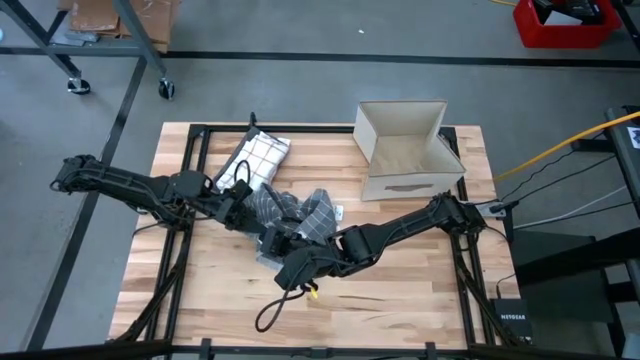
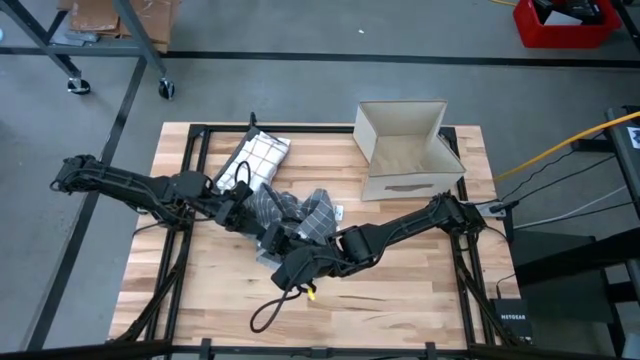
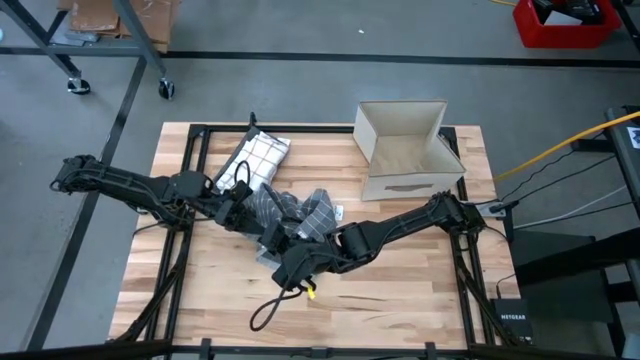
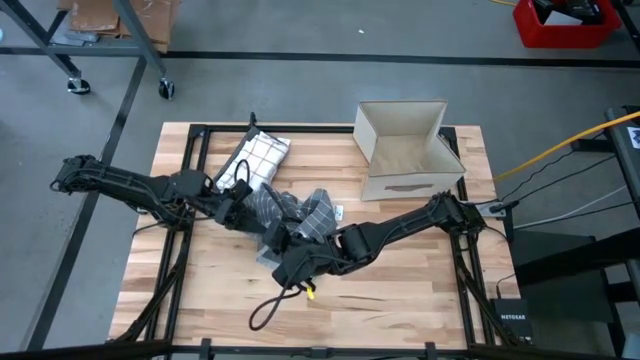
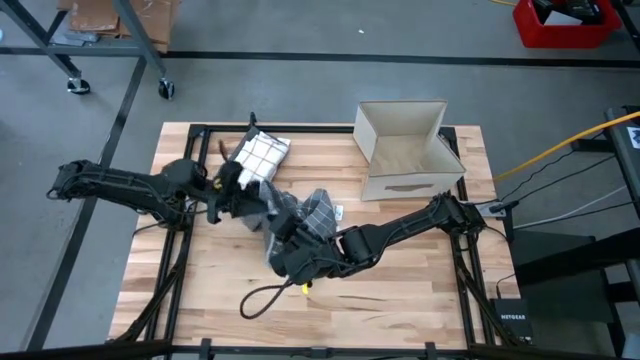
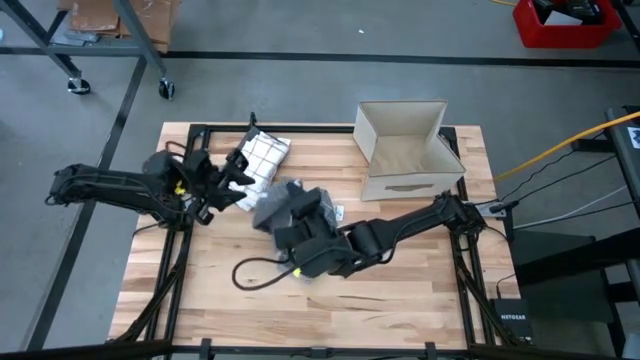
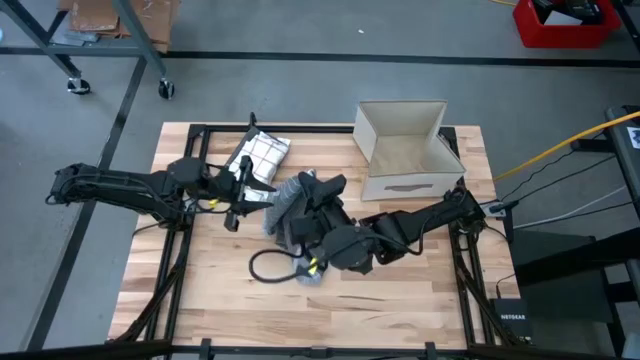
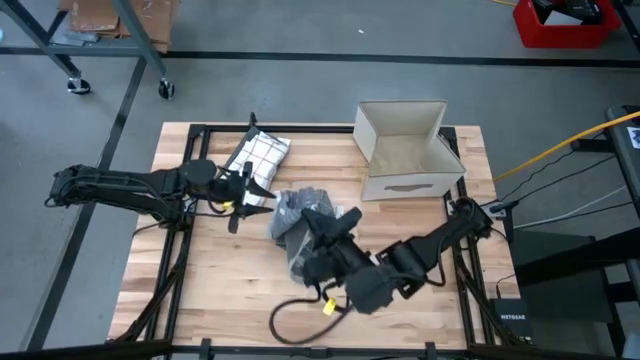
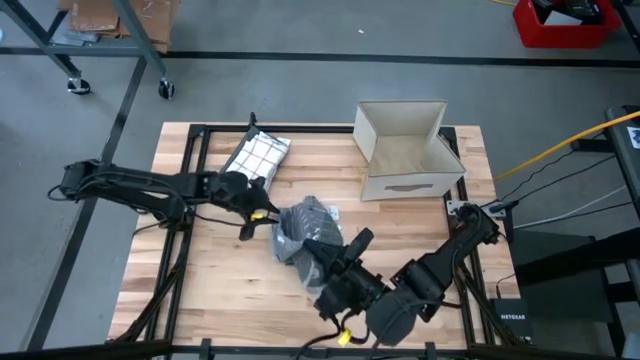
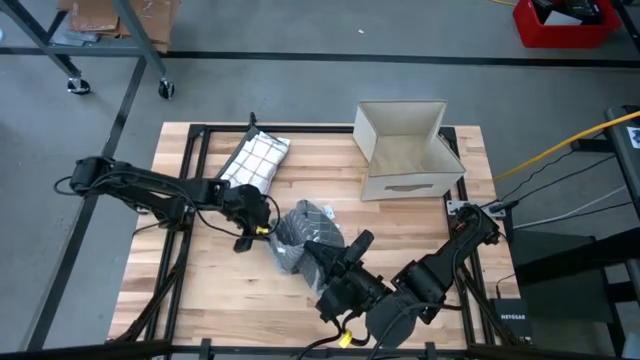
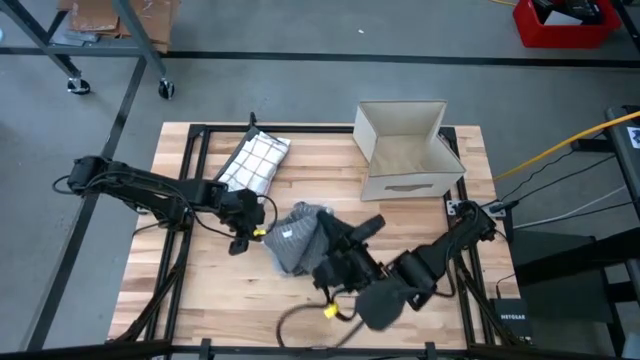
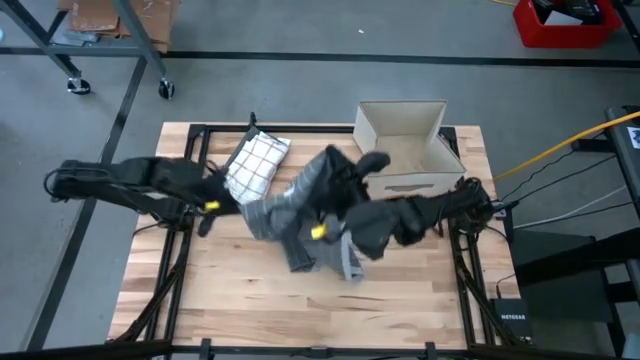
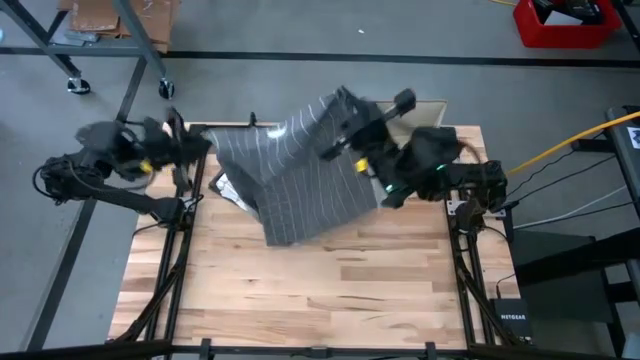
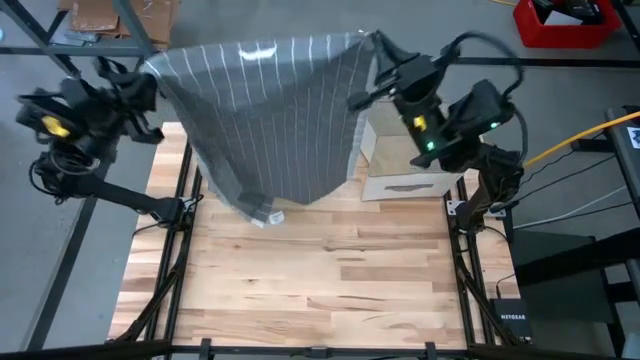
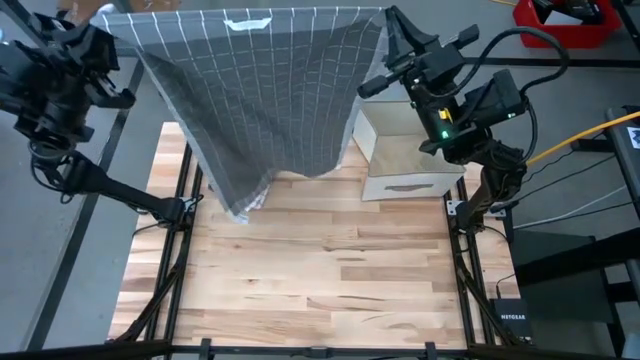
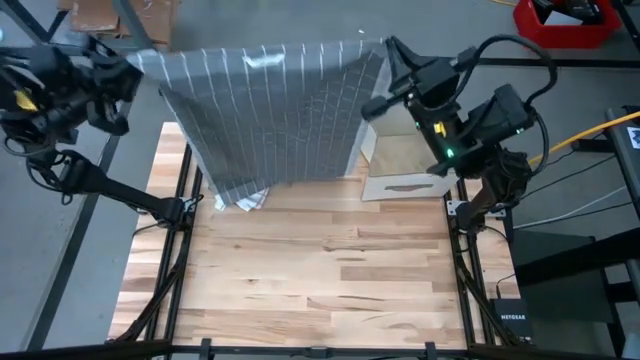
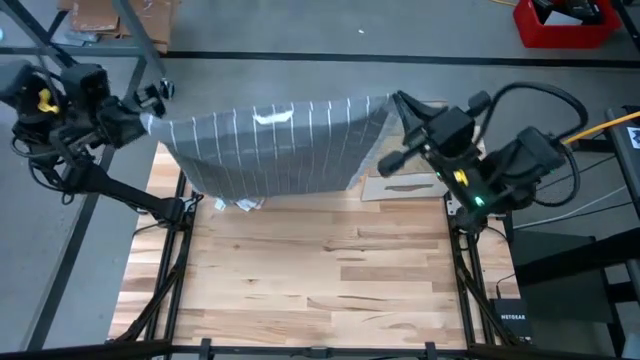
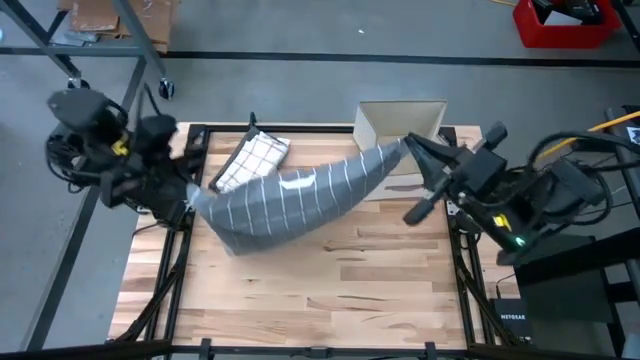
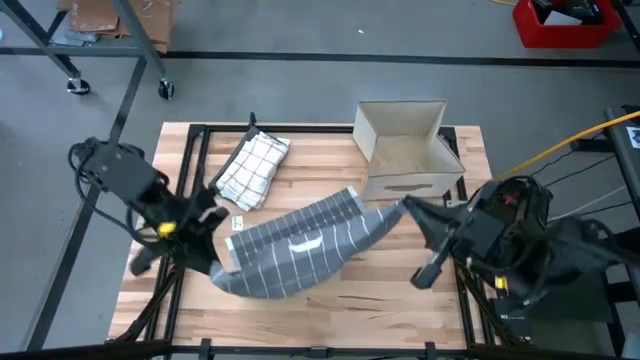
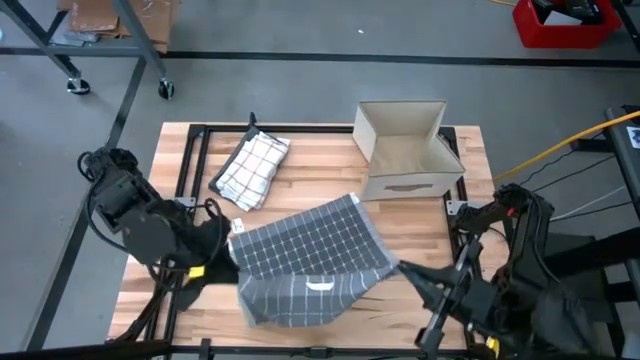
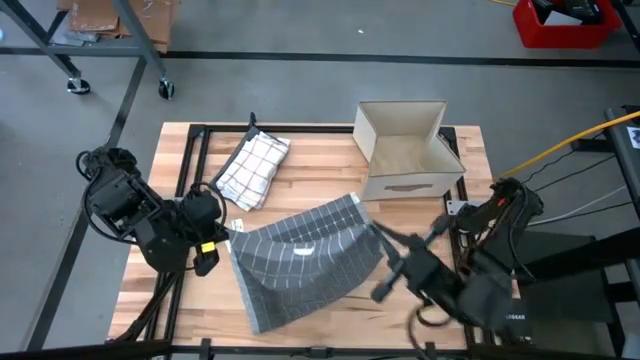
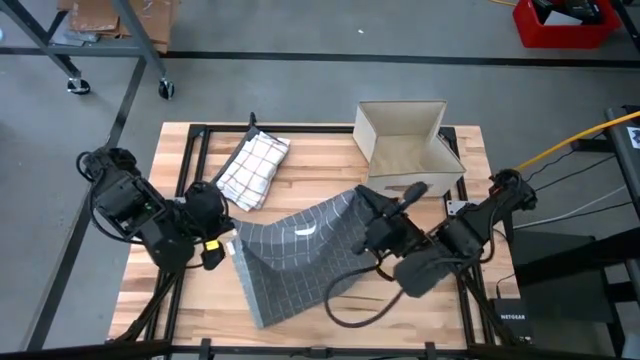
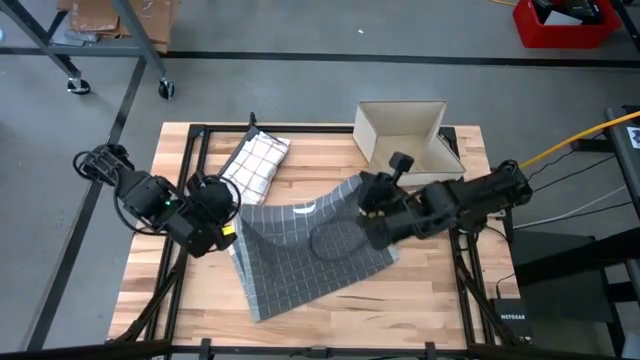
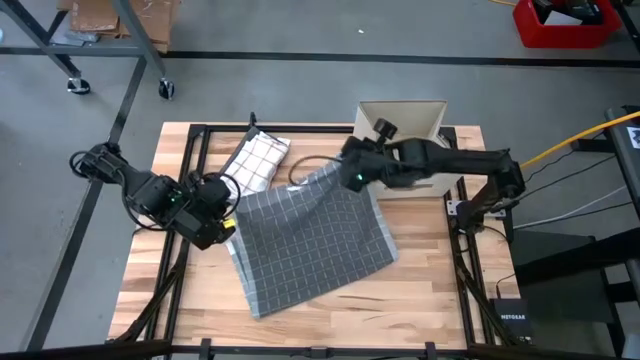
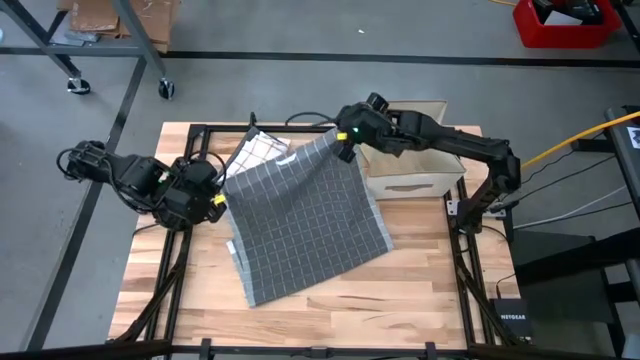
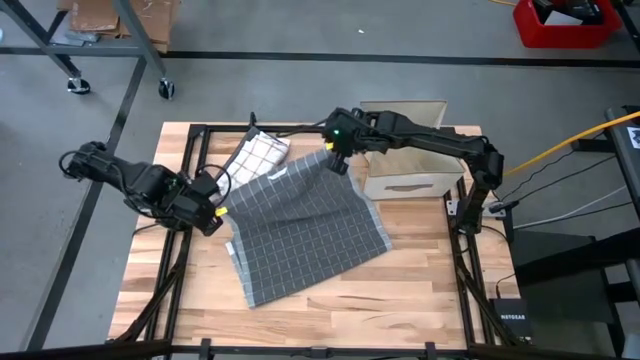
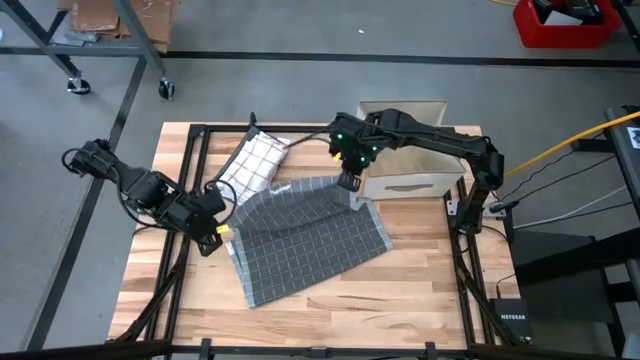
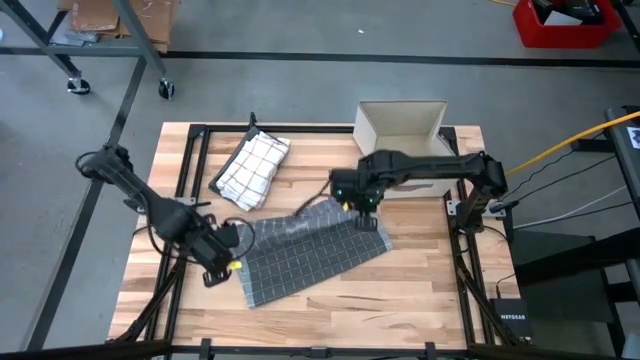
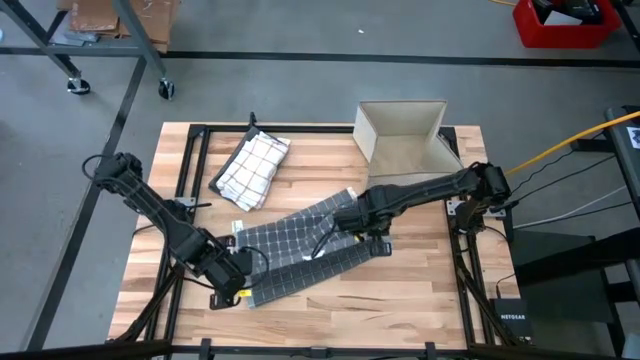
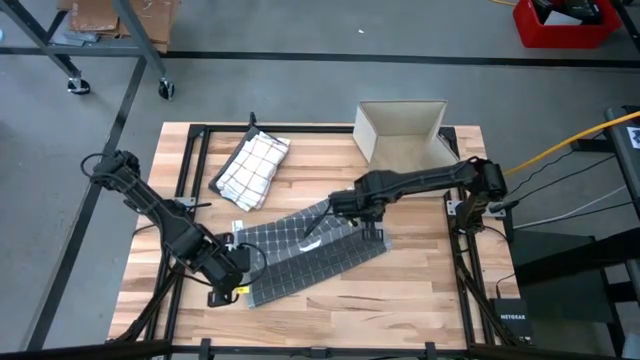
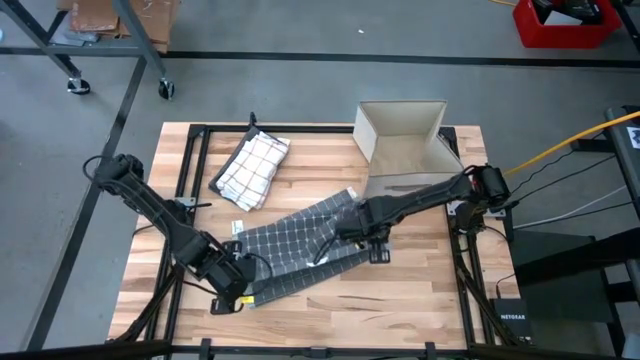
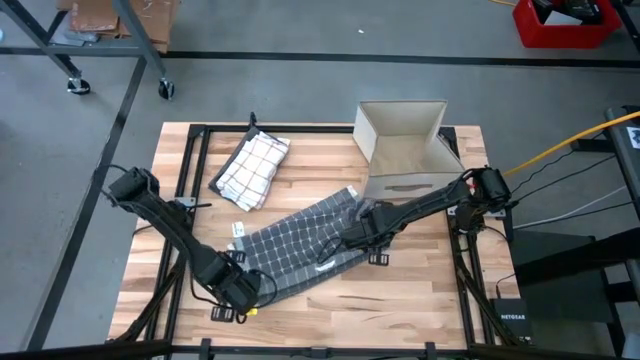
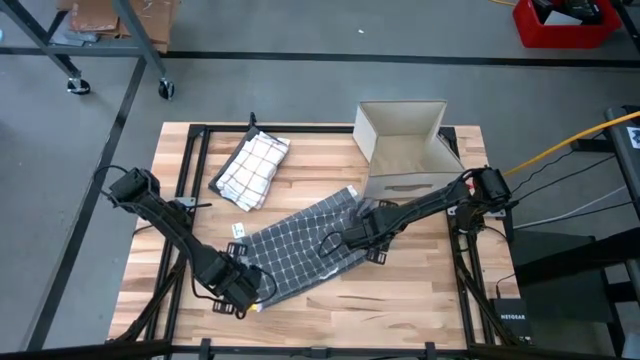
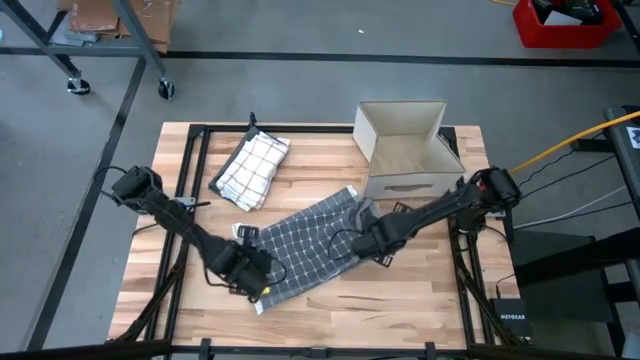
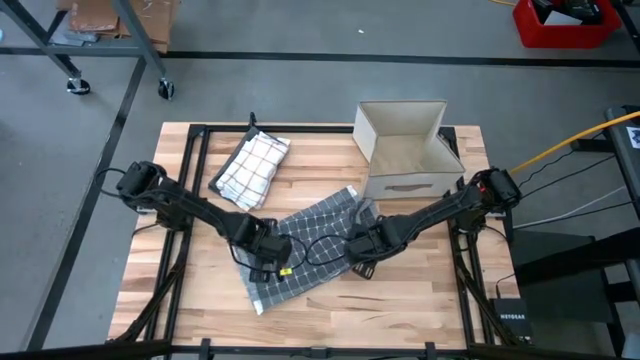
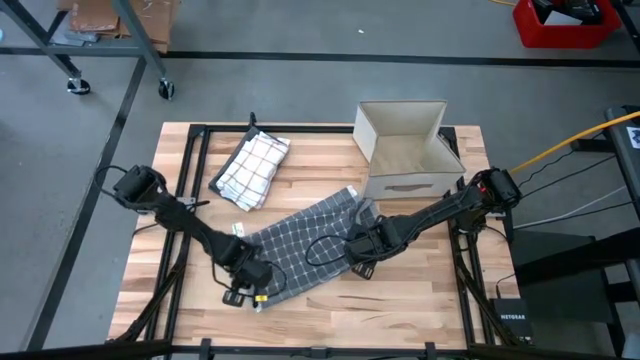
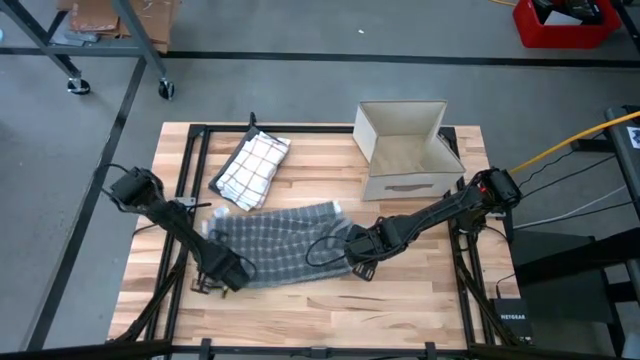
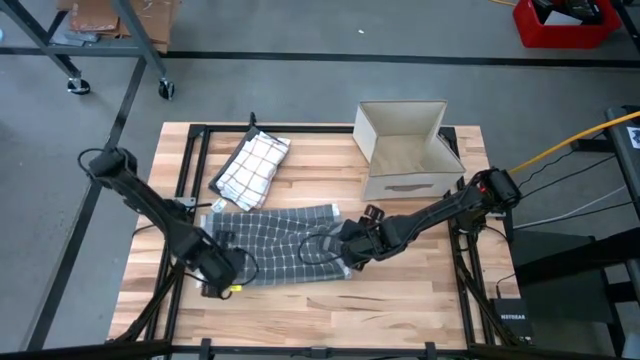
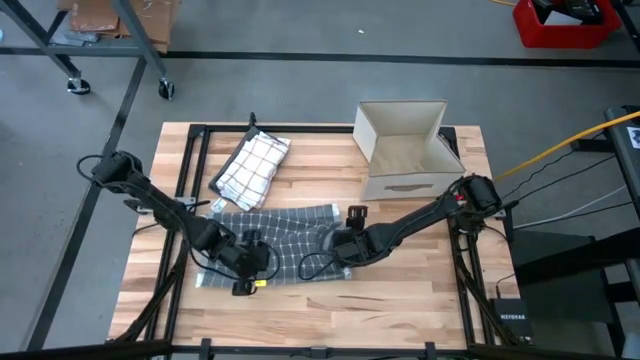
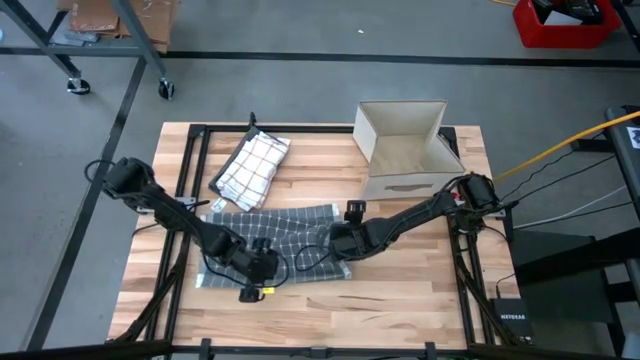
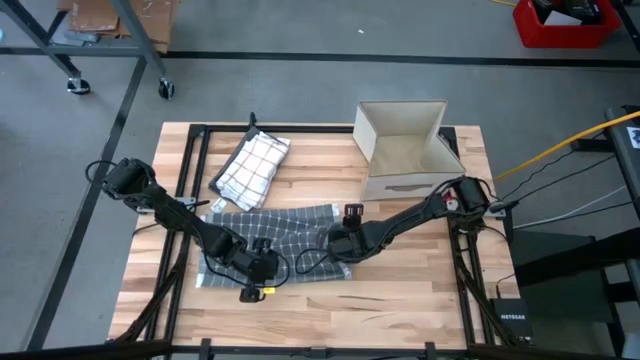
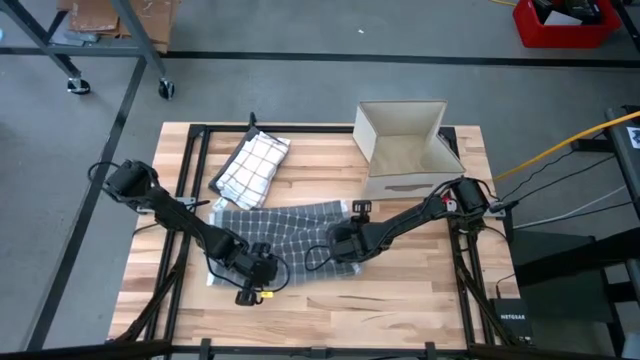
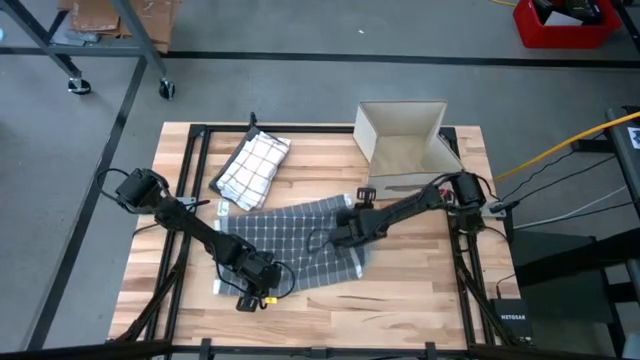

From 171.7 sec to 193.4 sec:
Task: Fold towel
Fold the gray white kitchen towel

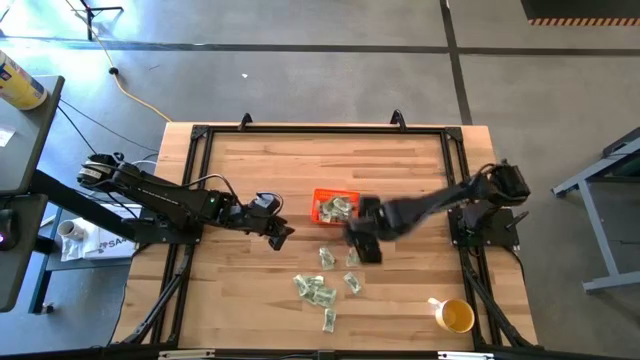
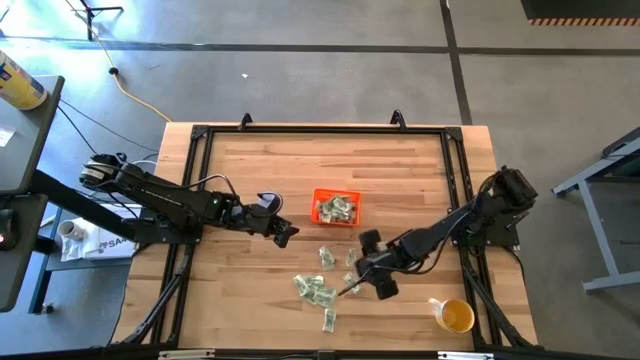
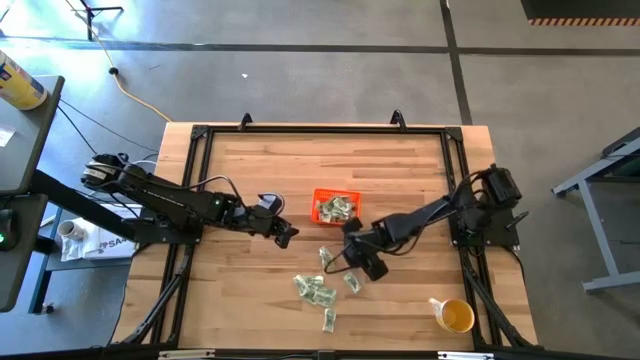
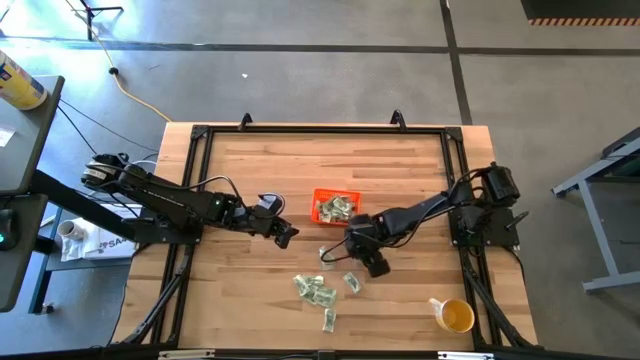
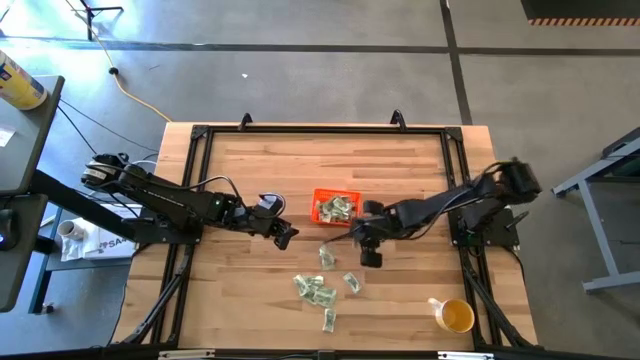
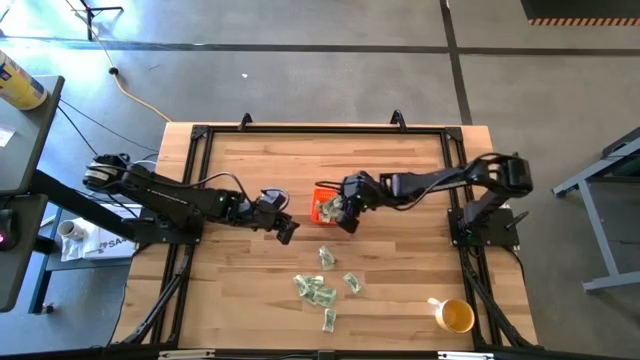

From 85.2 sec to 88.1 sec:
Task: Pick and place Stevia / Truvia into bins
Put the stevia packet into the orange bin
